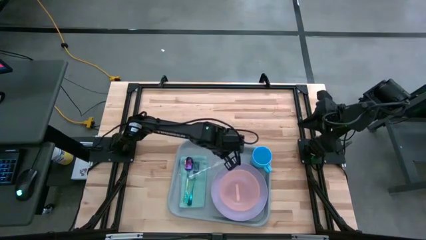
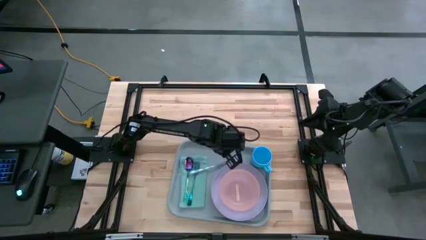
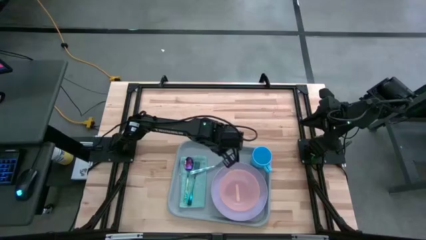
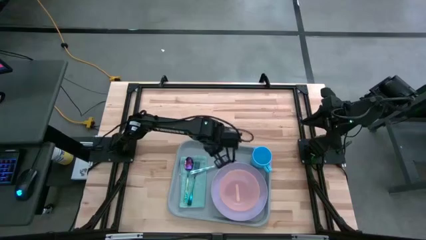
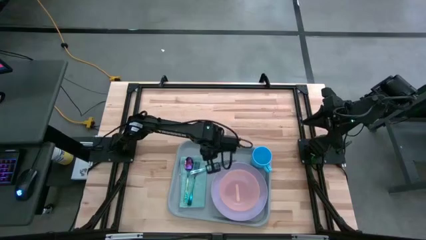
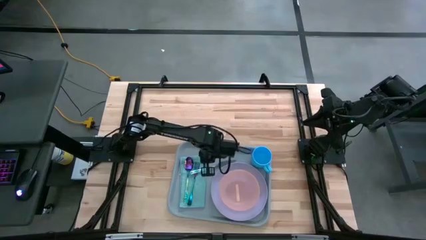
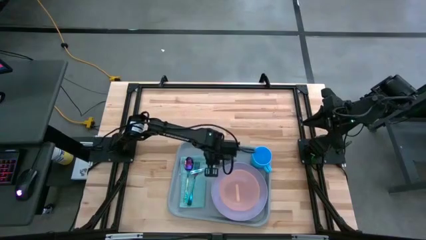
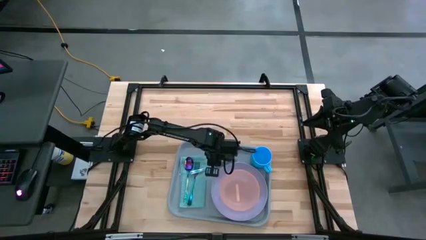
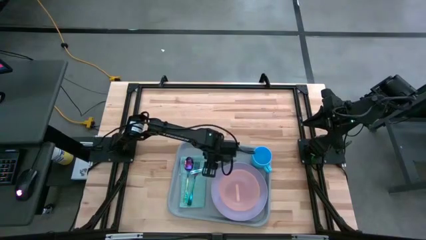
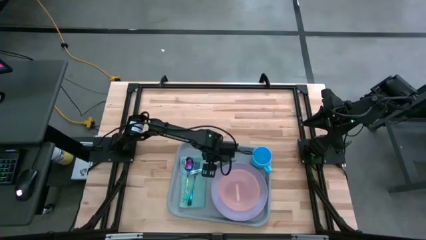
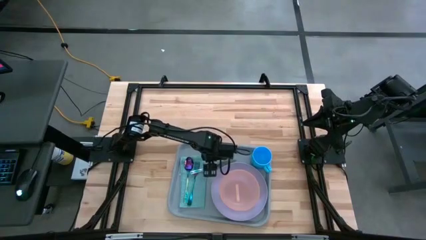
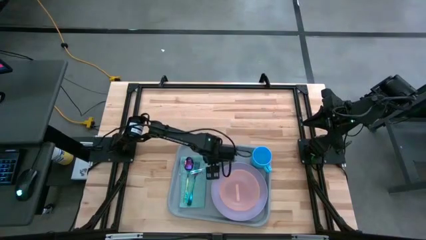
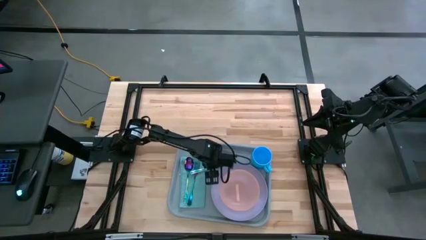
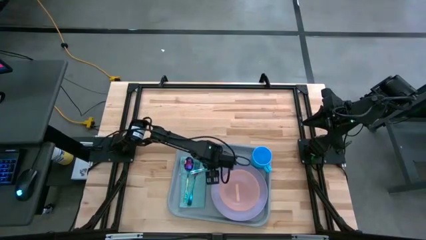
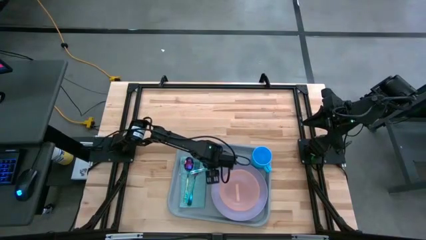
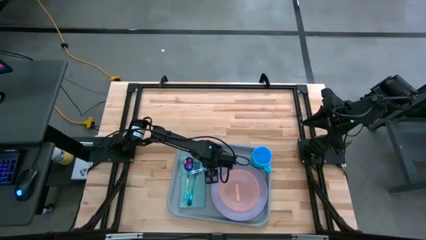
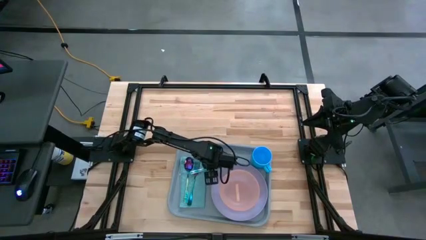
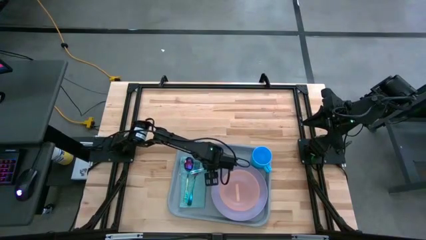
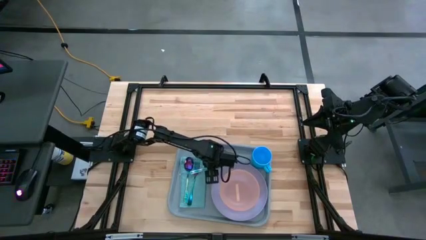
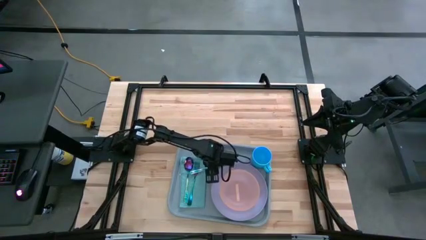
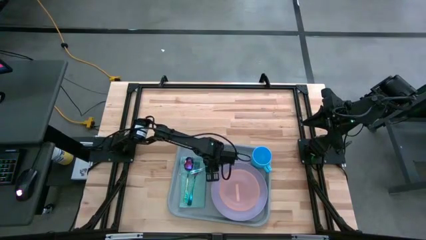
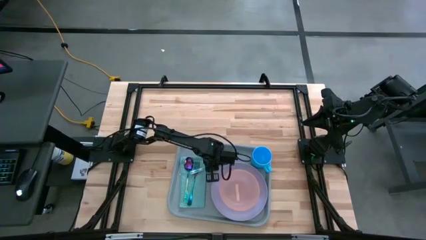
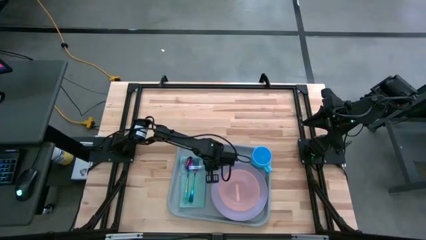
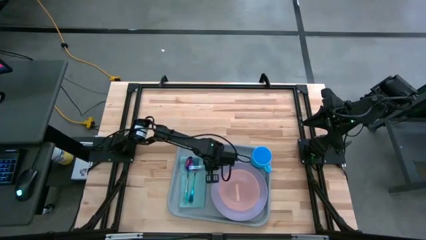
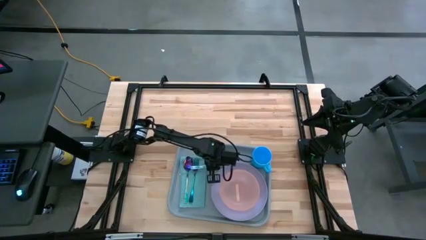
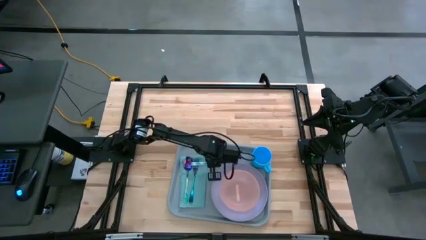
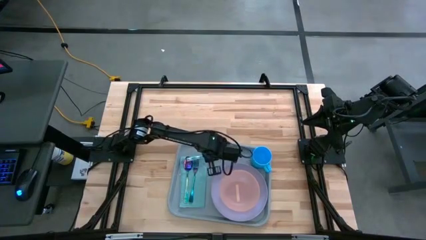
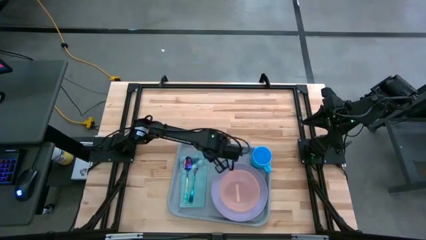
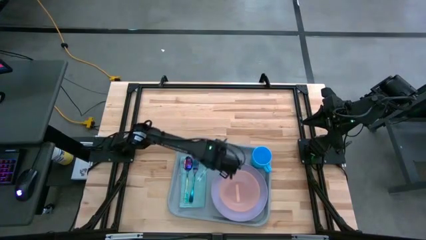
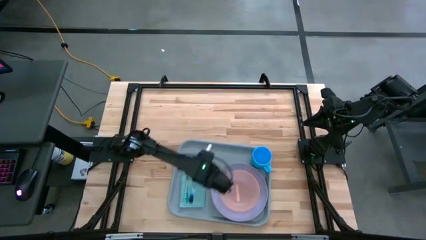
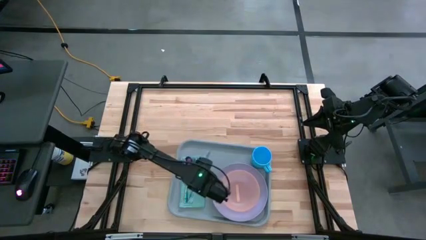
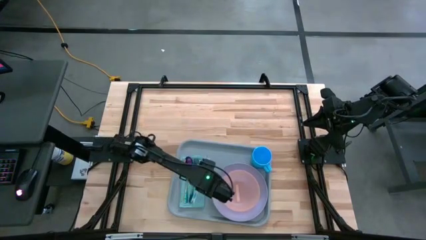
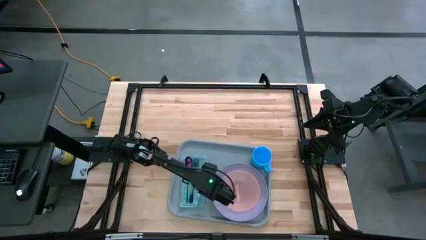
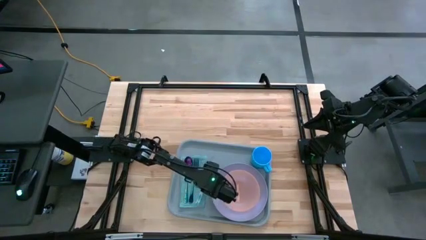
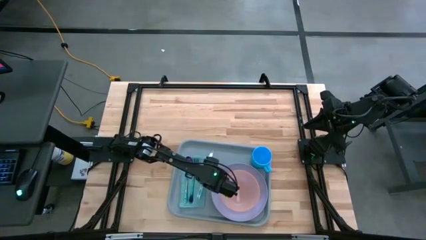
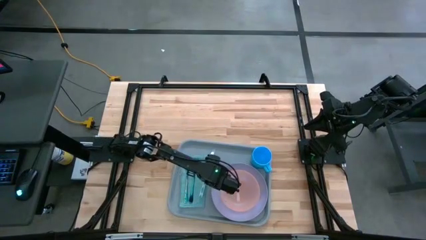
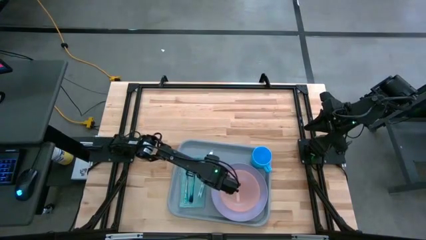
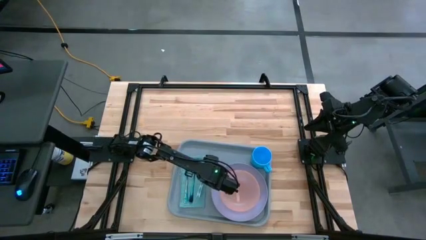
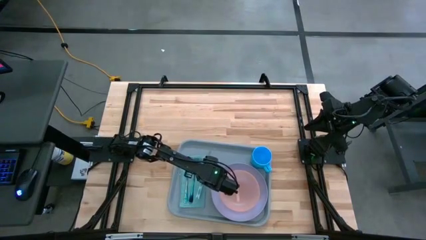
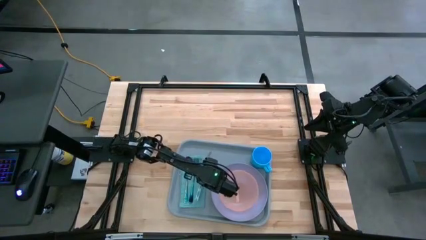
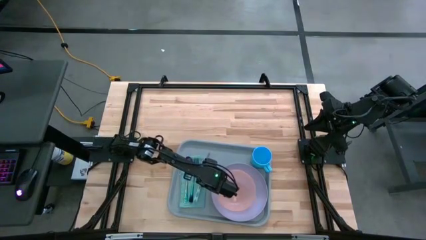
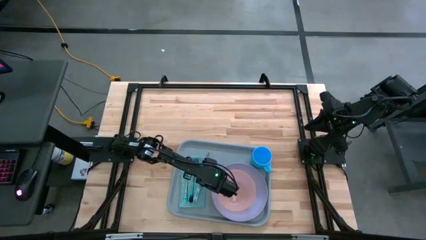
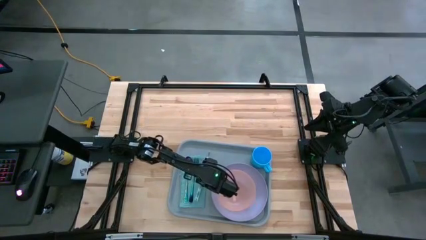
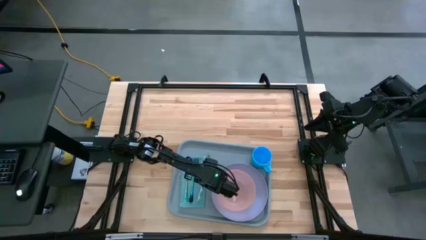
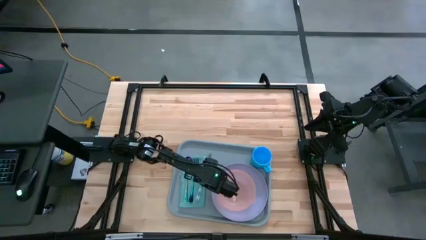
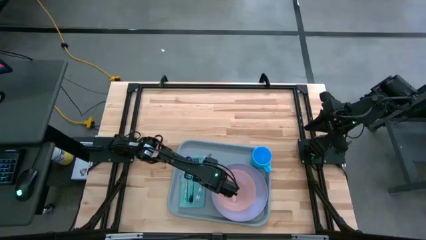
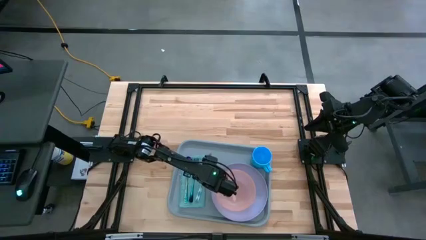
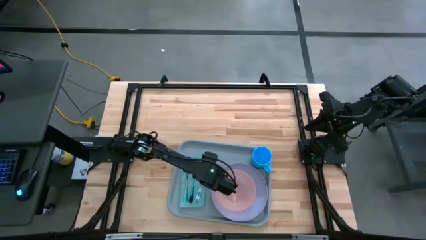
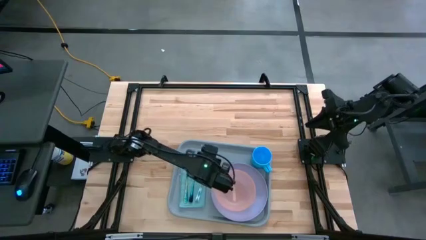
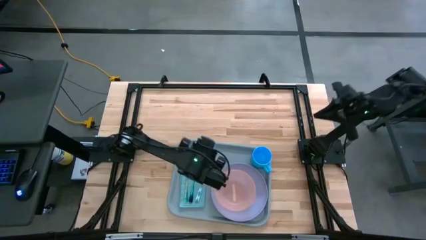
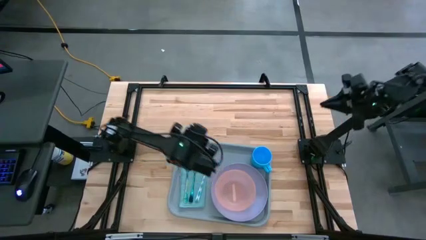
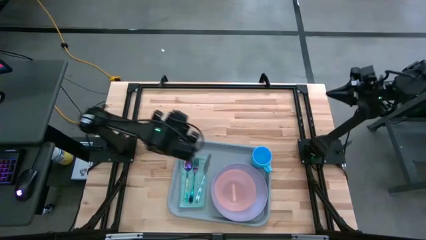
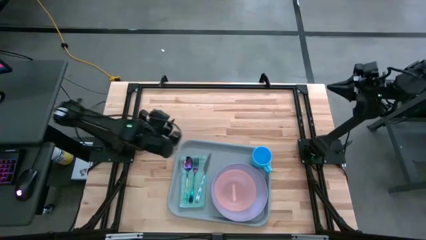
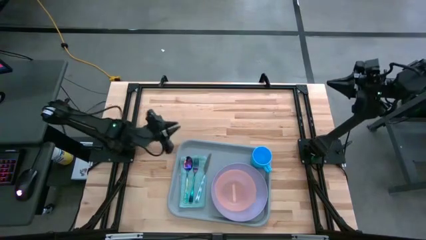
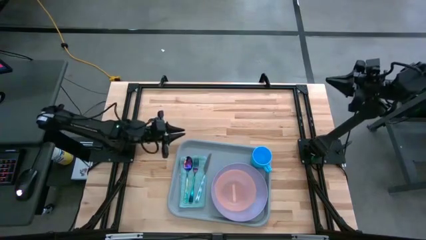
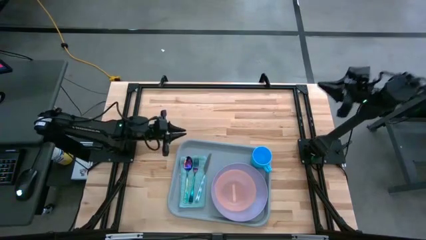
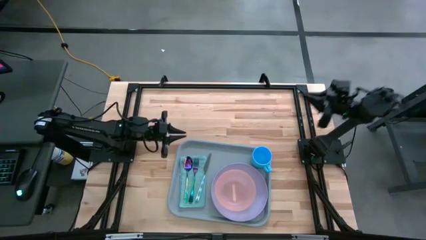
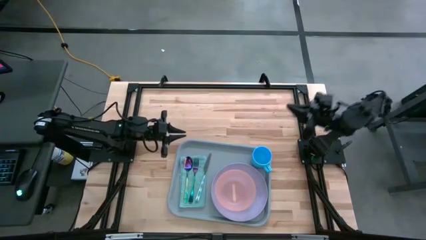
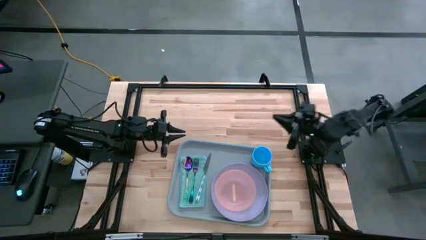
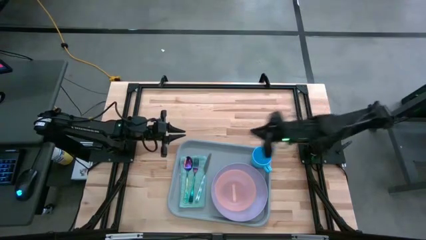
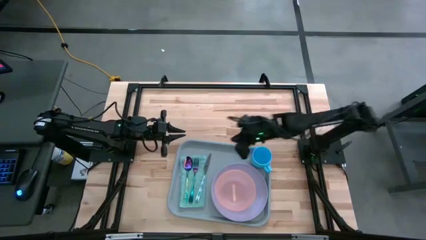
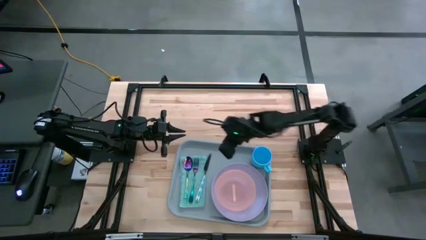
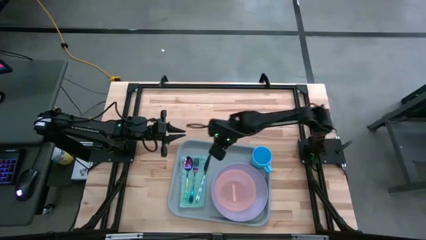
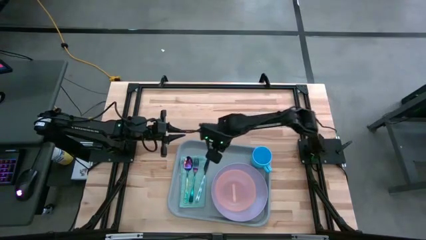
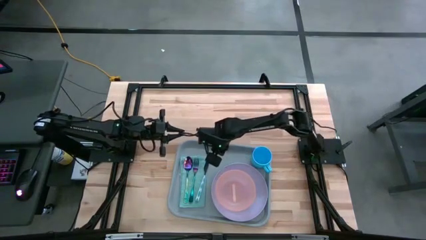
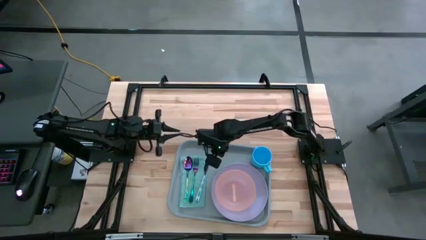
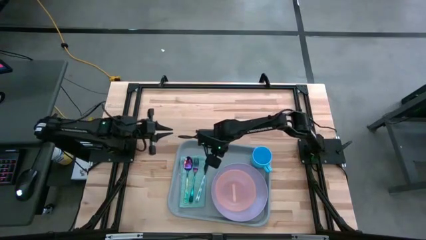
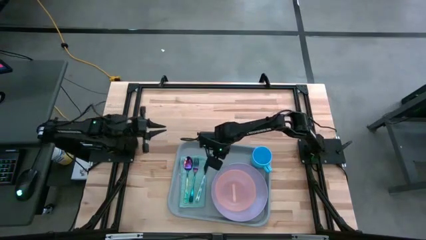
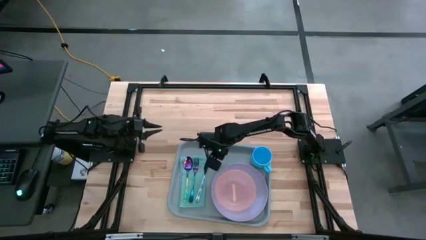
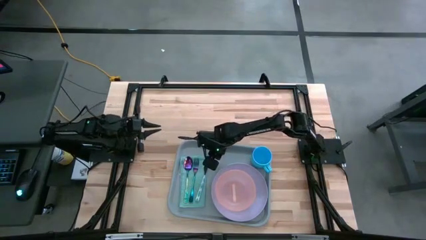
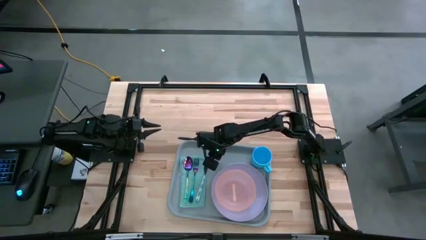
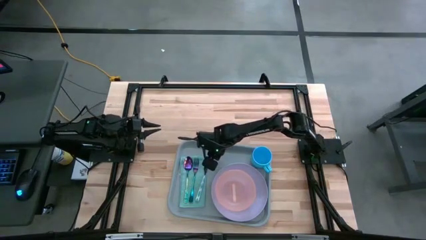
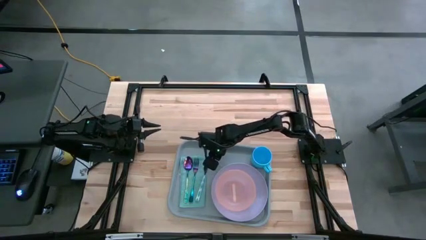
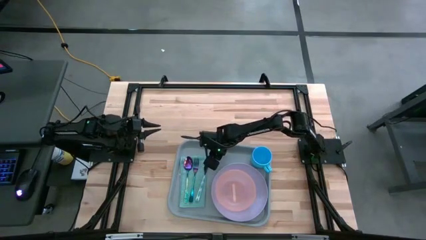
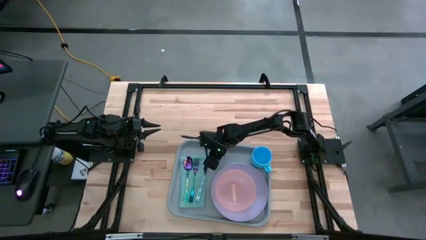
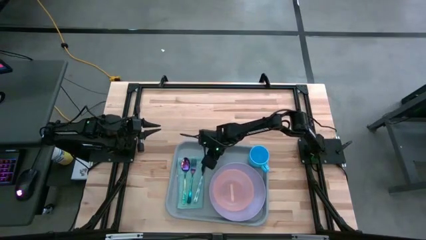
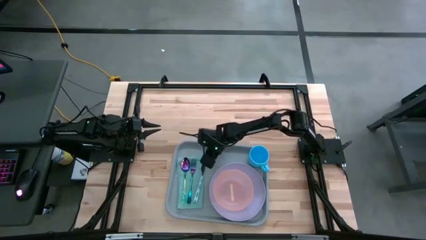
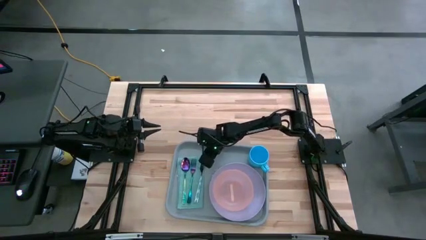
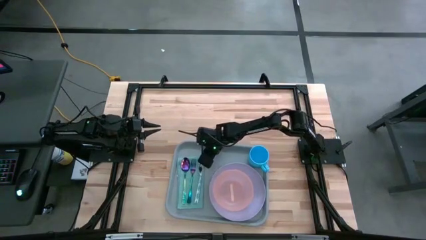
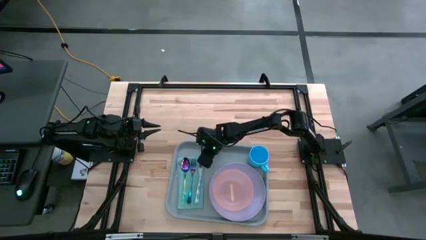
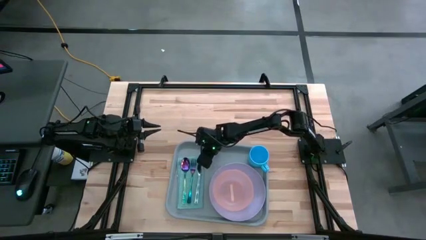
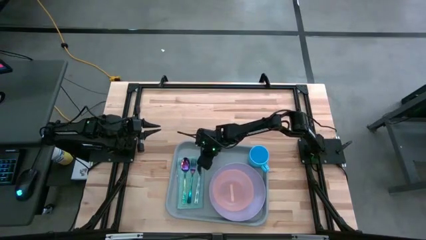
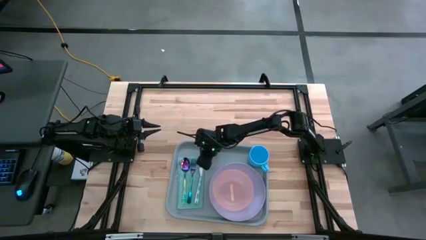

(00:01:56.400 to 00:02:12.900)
Task: Set up tray
Adjust the green knife on the blue napkin
